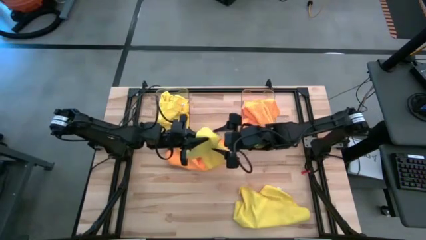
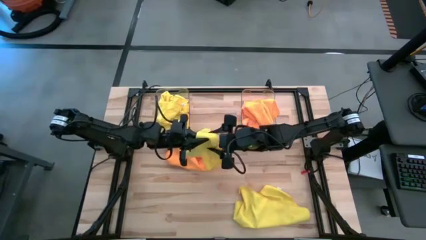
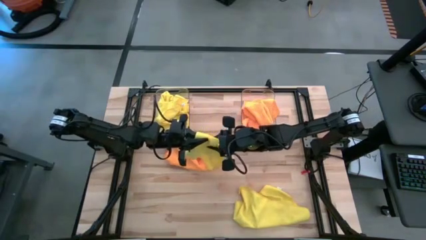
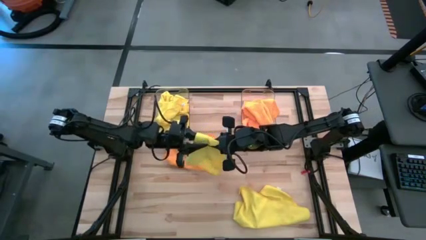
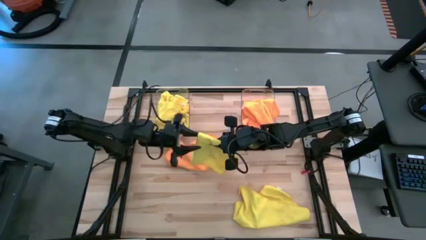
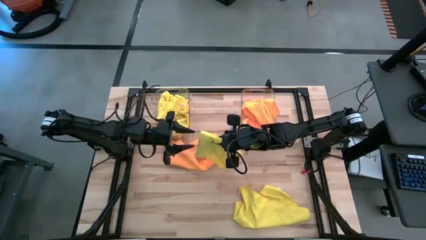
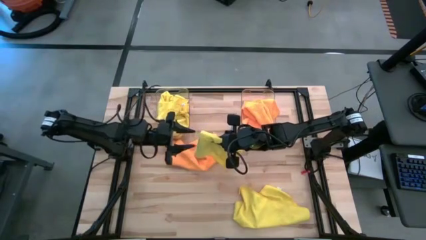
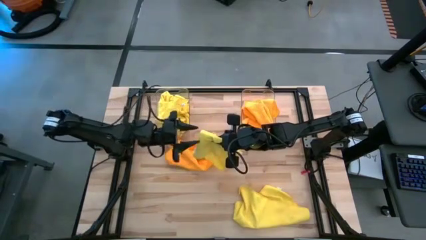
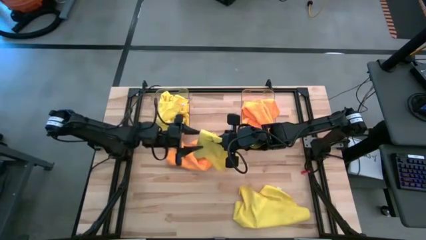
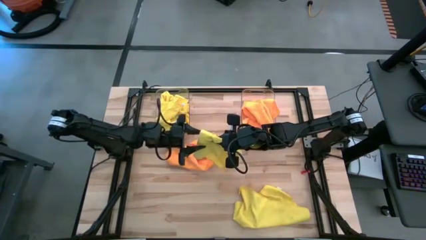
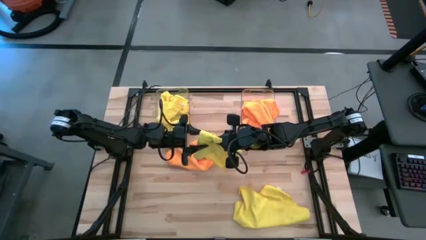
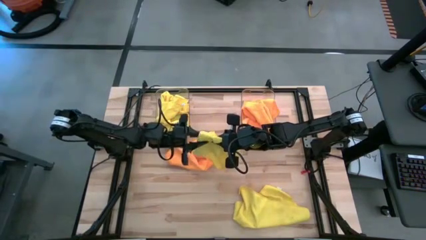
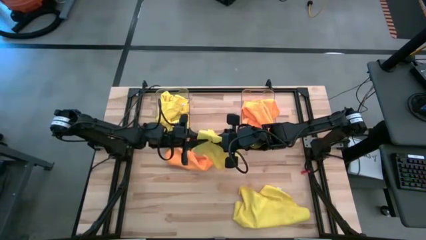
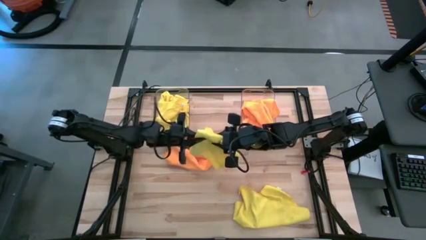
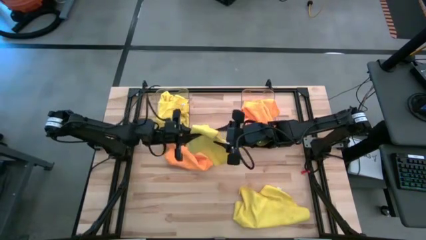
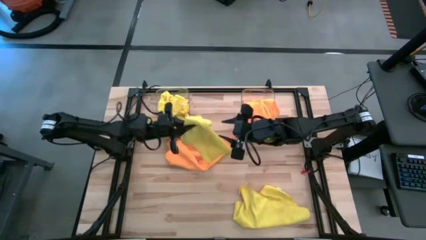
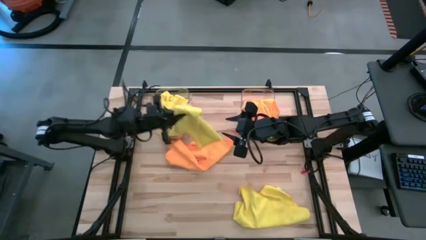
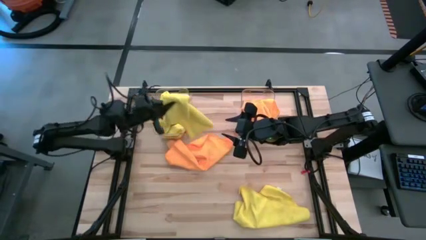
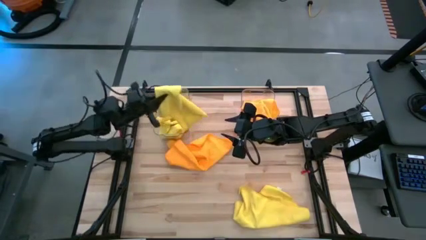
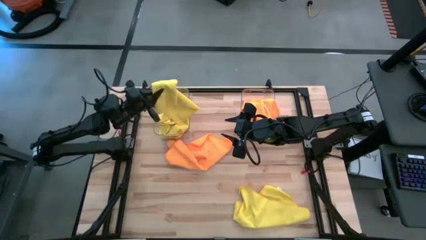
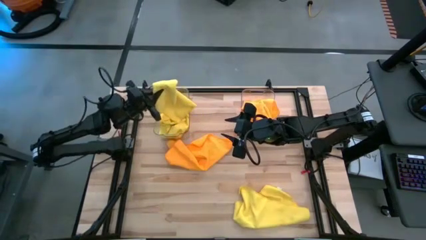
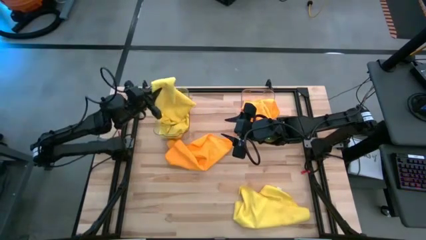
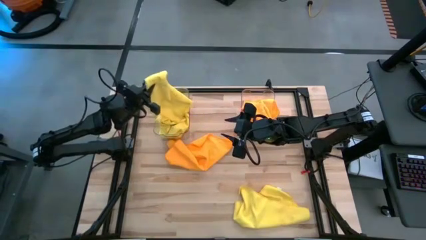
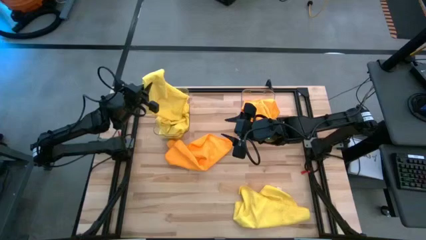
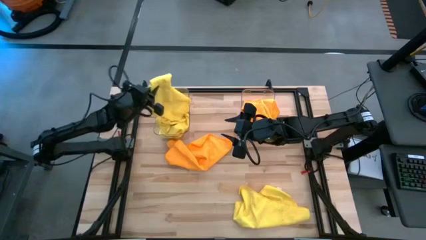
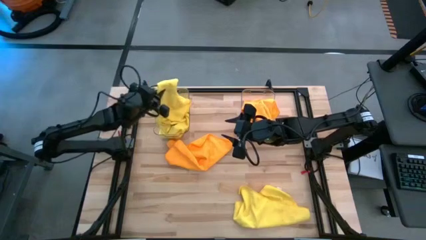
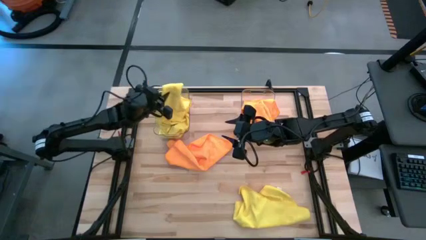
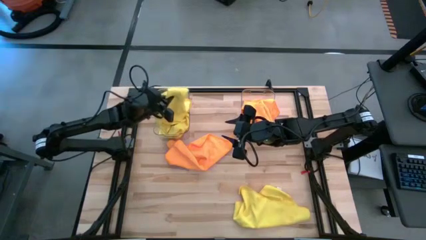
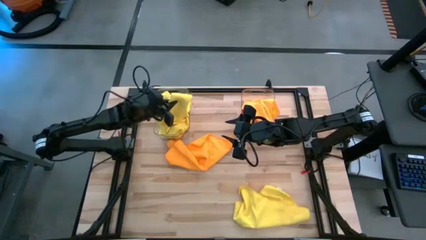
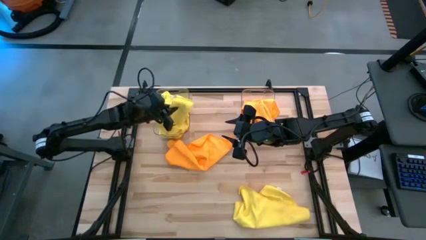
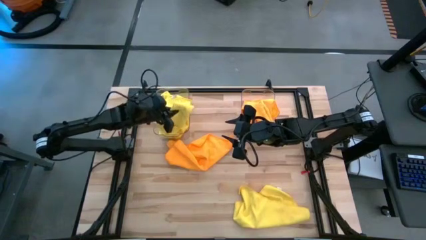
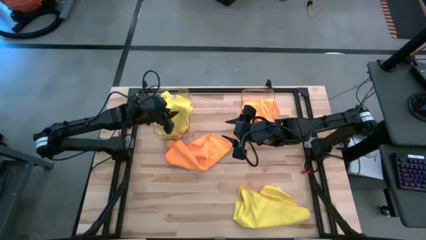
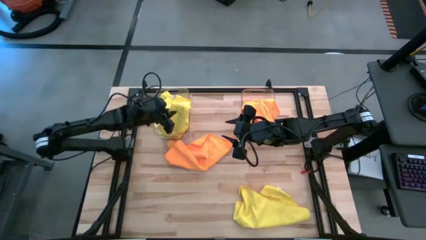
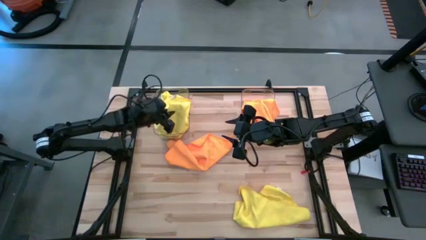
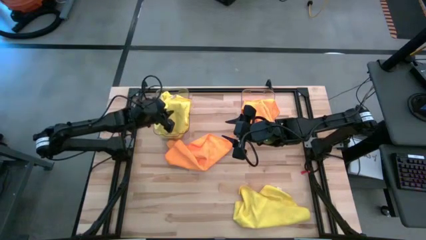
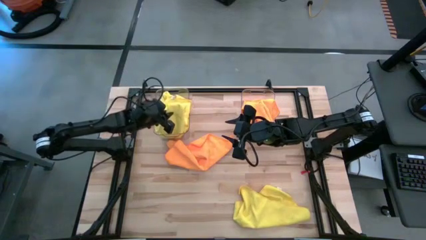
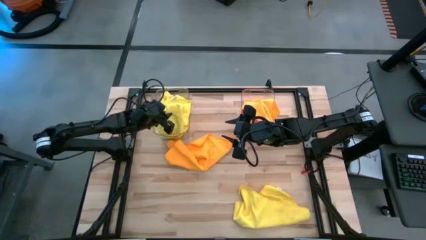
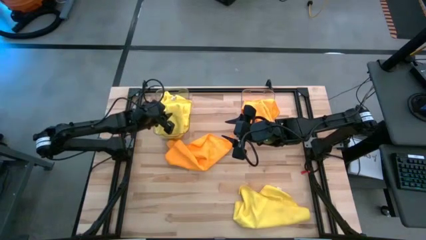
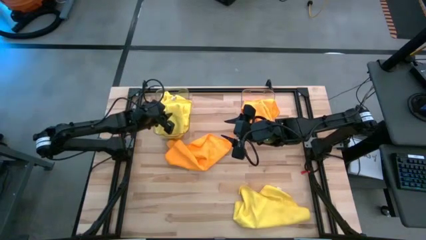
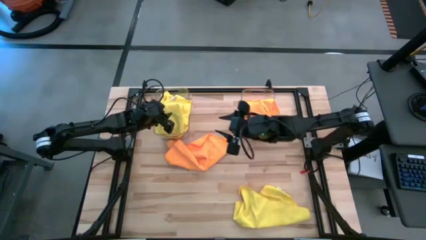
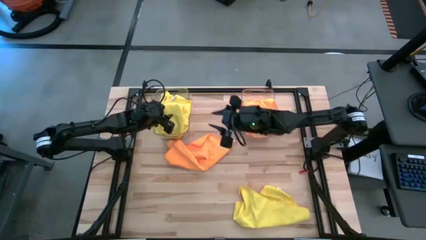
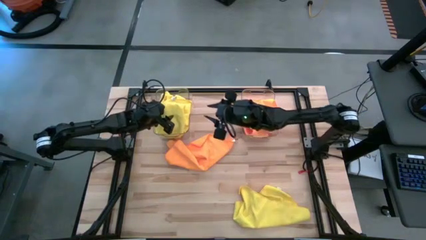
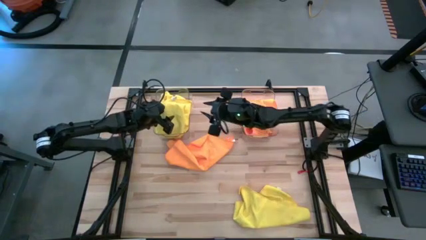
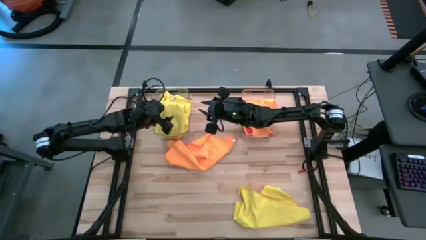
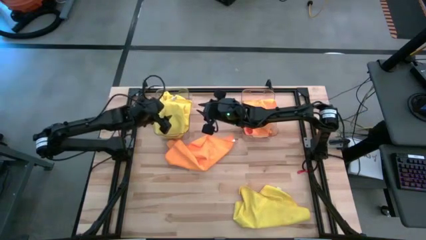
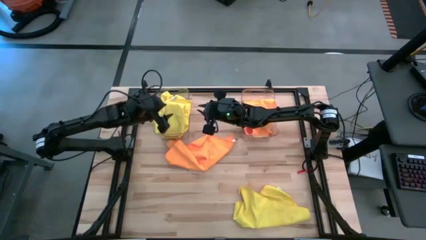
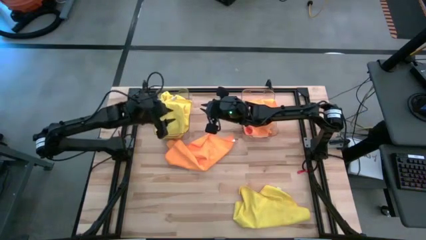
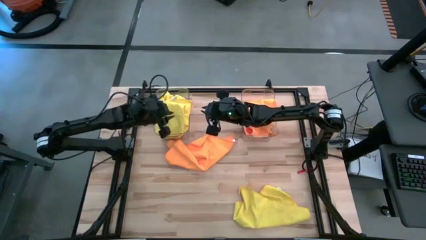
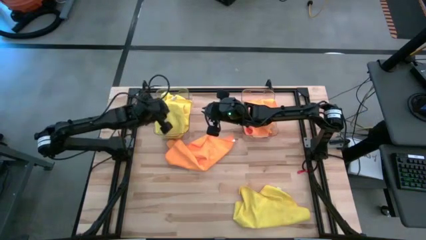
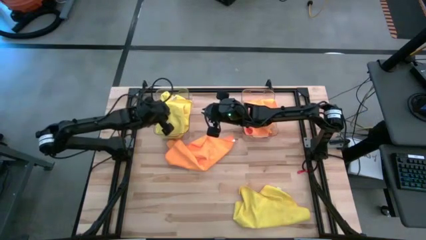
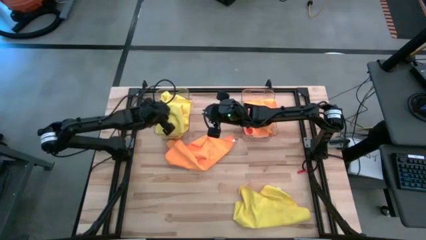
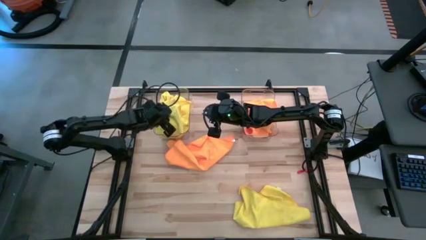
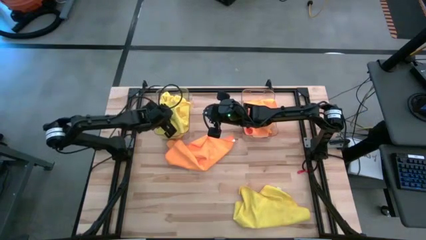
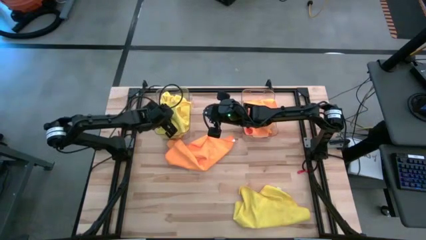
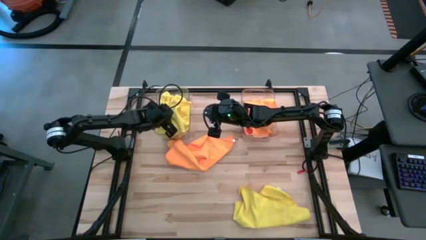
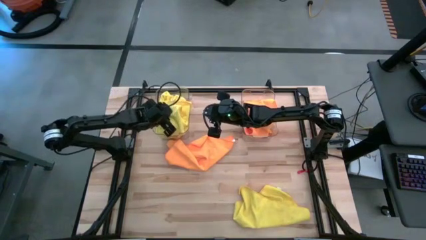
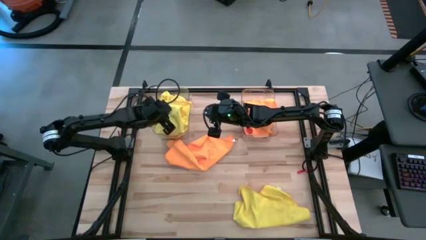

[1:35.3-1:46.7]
Task: Sort microfiber towel by color & place in baskets
Put the yellow microfiber cloth into the left transparent bin

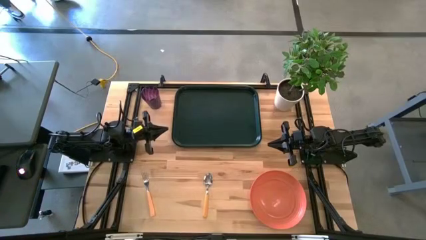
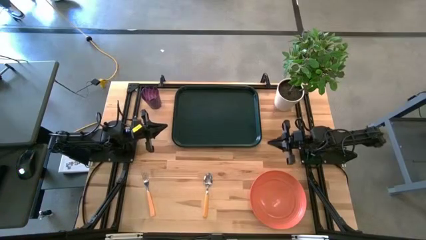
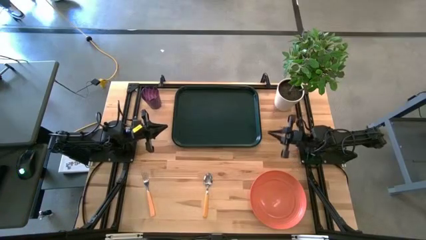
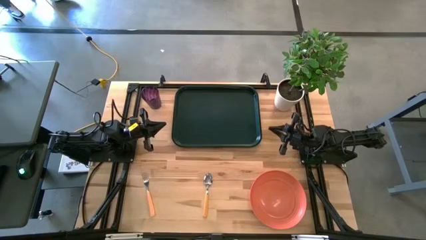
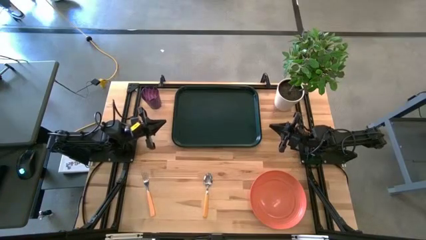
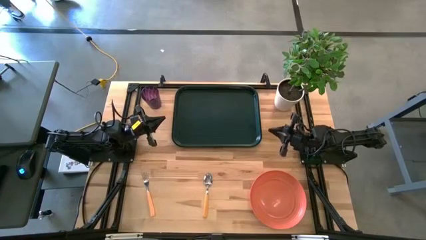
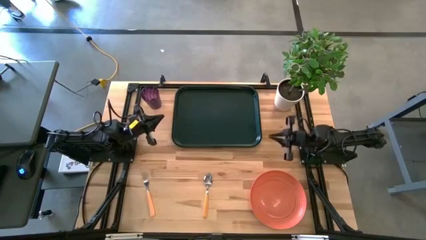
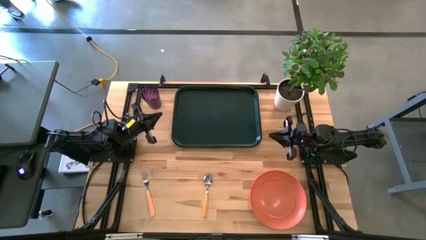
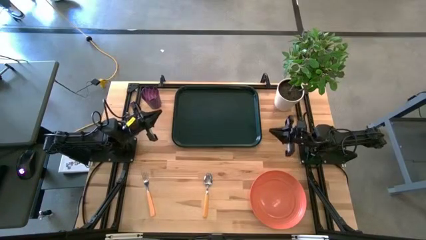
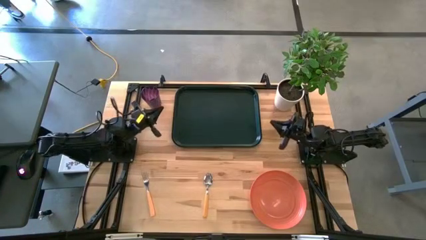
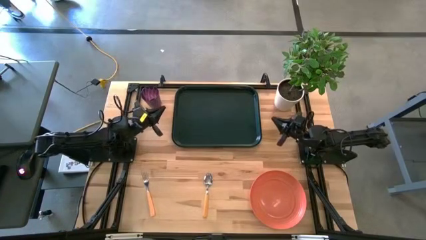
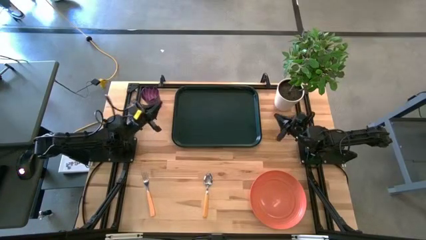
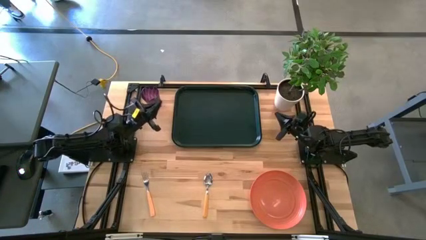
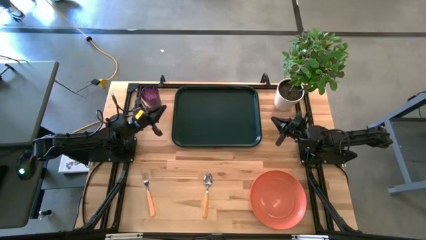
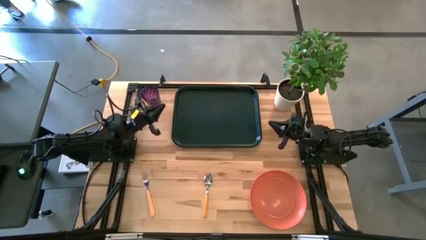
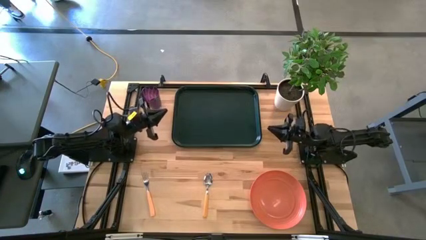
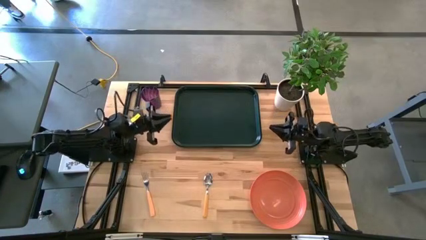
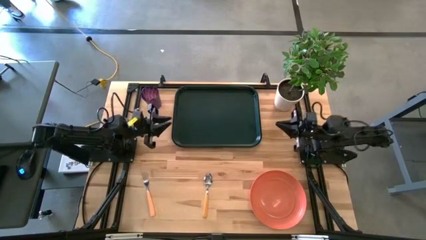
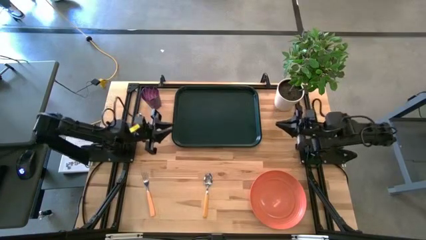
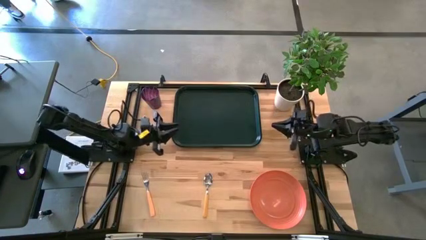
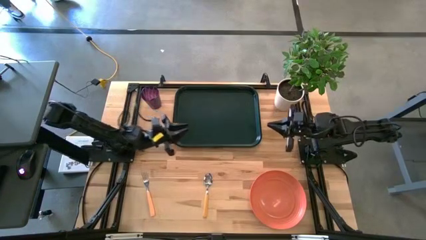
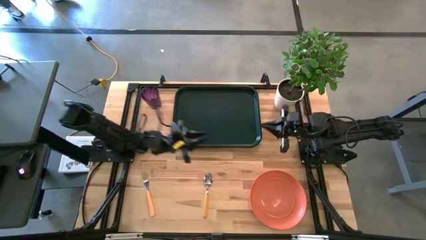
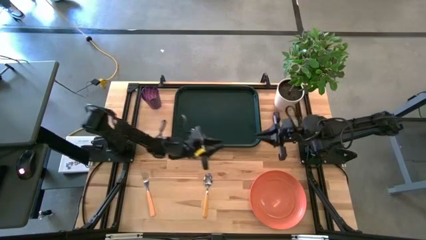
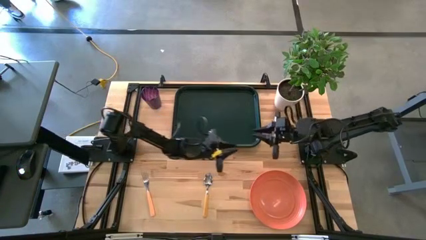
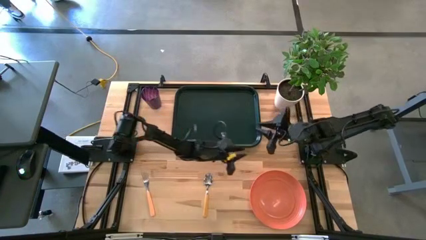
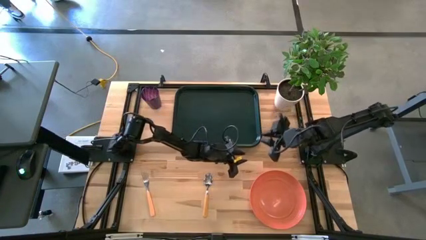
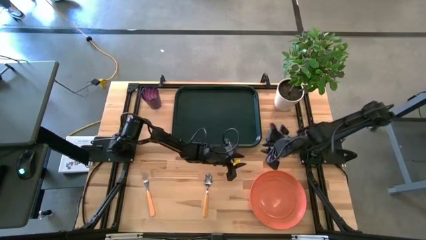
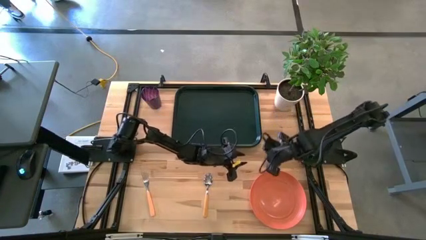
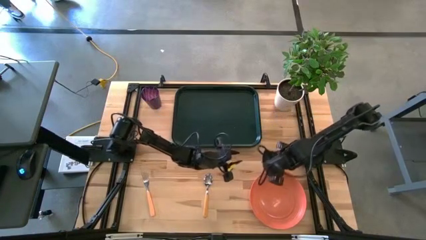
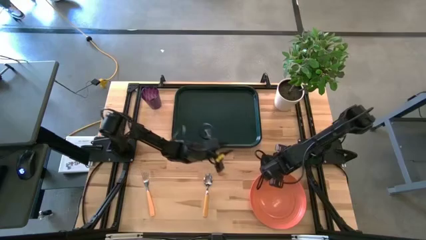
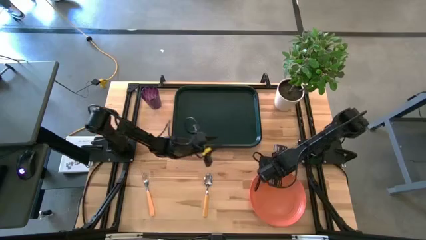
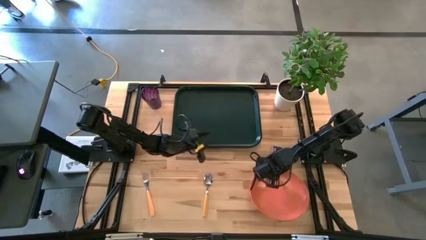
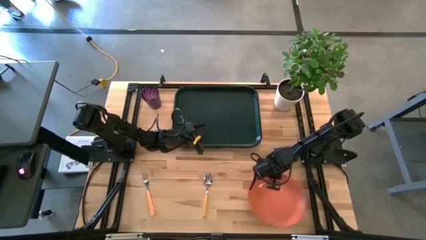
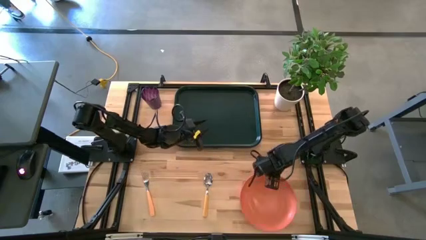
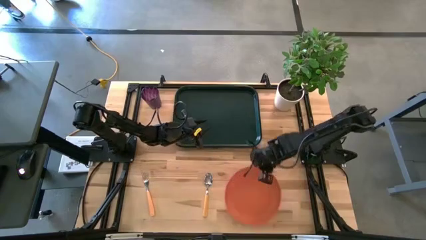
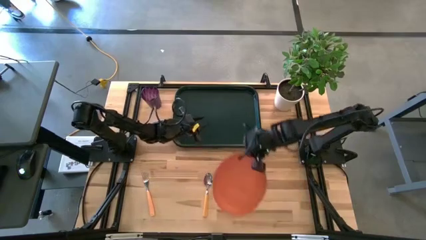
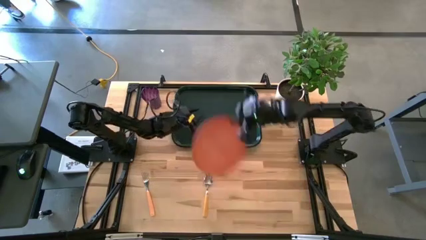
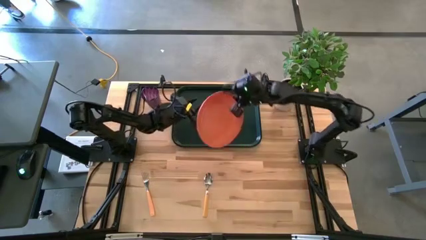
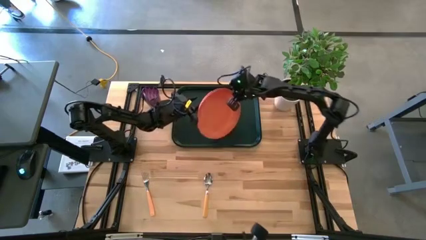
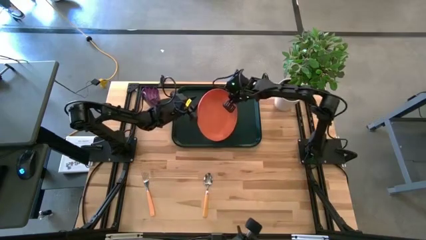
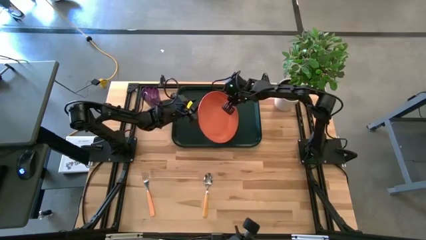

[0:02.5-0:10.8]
Task: Pick and place plate/cup/fork/spoon on tray
Put the orange plate on the black serving tray
